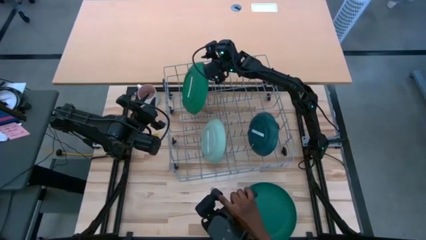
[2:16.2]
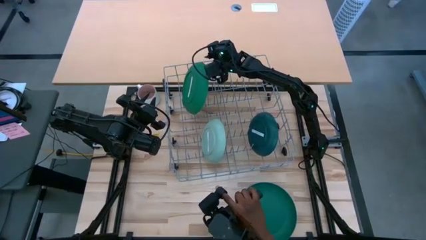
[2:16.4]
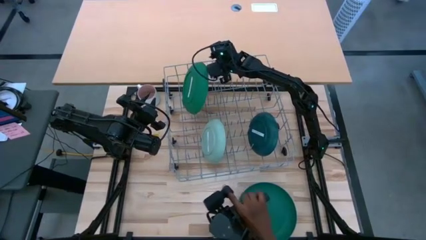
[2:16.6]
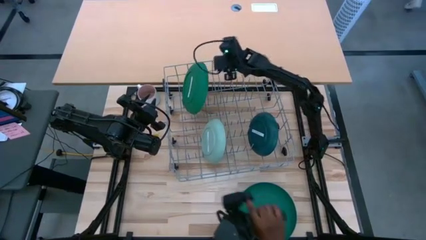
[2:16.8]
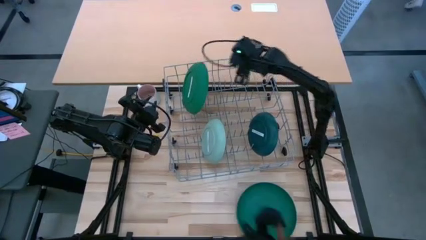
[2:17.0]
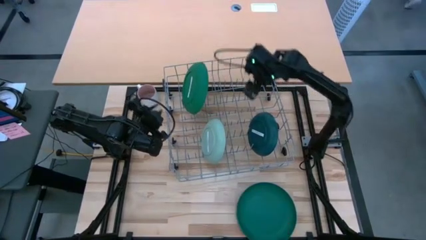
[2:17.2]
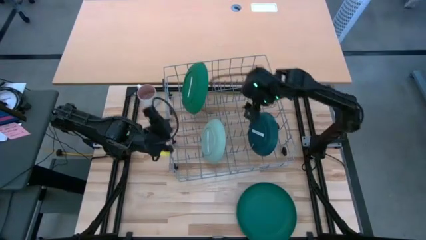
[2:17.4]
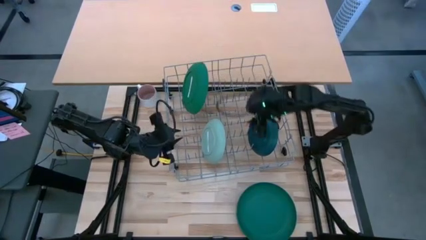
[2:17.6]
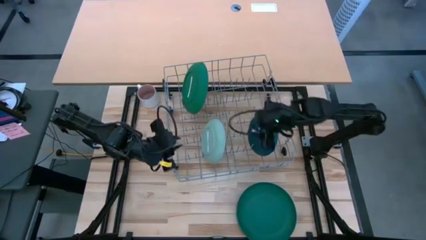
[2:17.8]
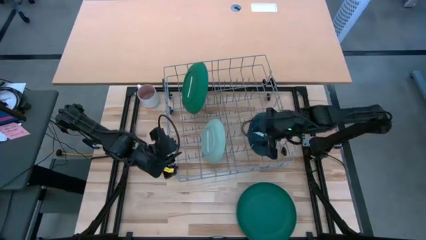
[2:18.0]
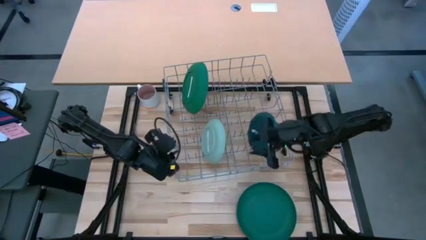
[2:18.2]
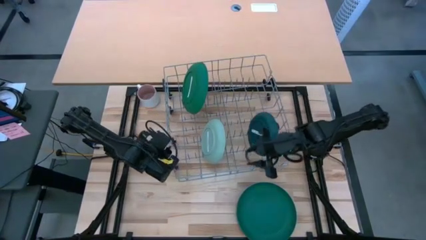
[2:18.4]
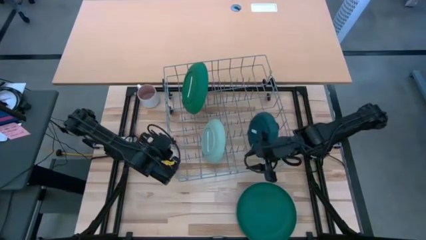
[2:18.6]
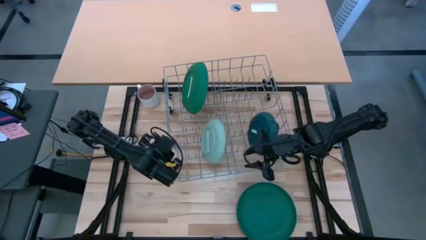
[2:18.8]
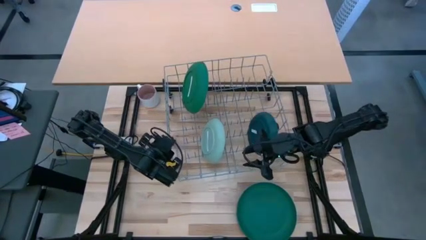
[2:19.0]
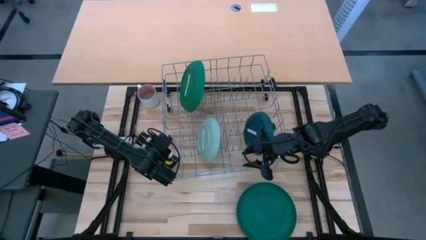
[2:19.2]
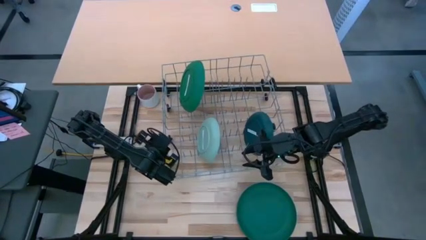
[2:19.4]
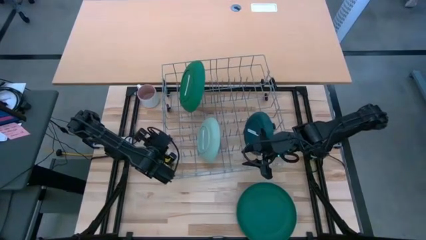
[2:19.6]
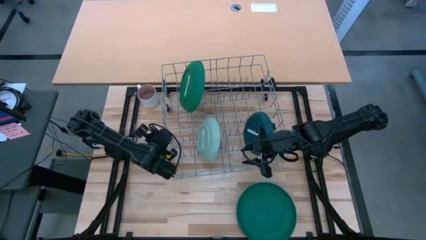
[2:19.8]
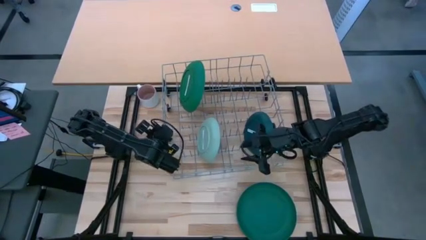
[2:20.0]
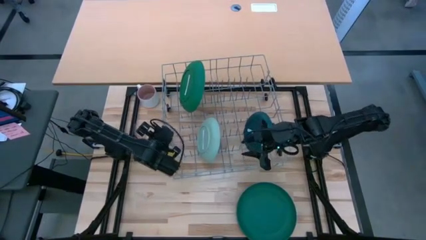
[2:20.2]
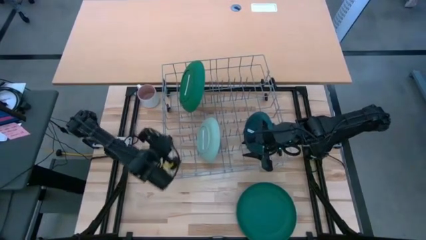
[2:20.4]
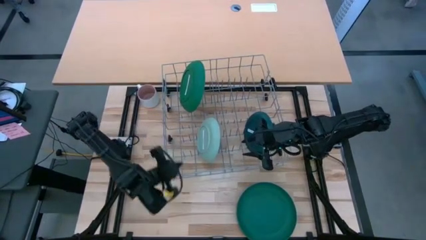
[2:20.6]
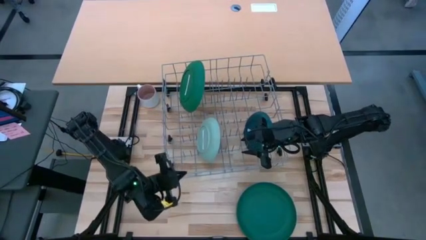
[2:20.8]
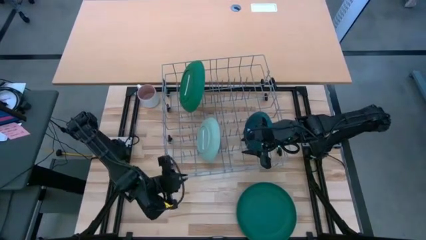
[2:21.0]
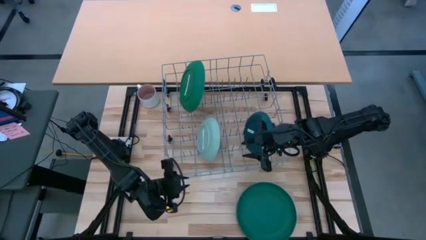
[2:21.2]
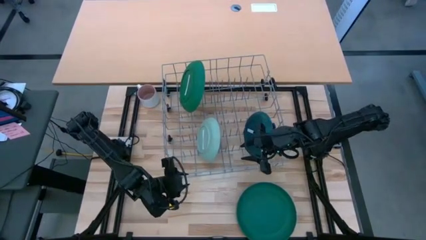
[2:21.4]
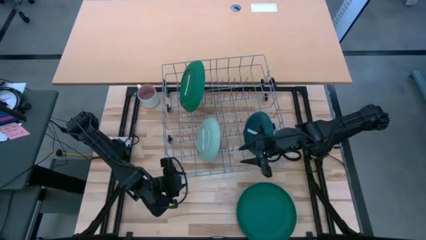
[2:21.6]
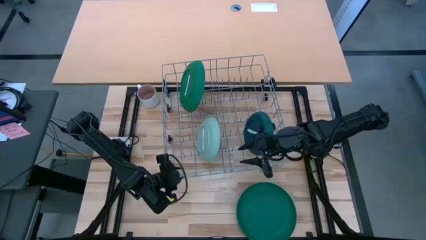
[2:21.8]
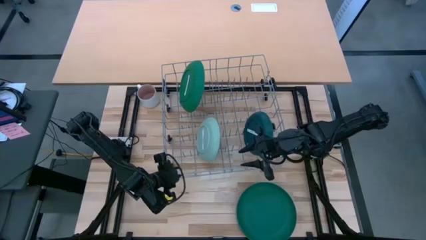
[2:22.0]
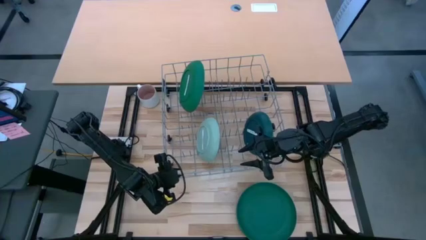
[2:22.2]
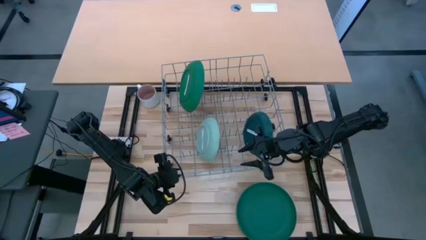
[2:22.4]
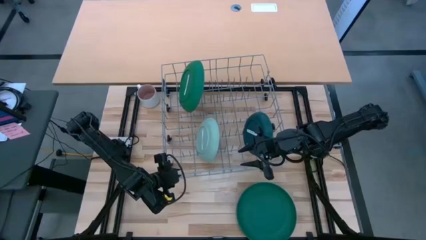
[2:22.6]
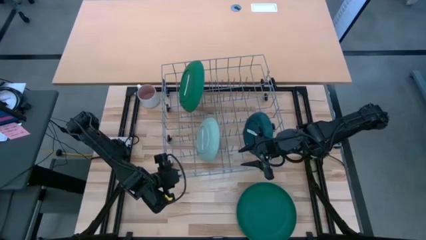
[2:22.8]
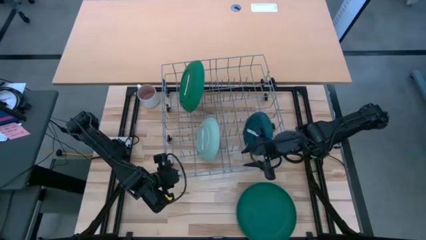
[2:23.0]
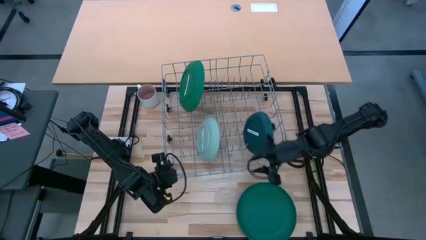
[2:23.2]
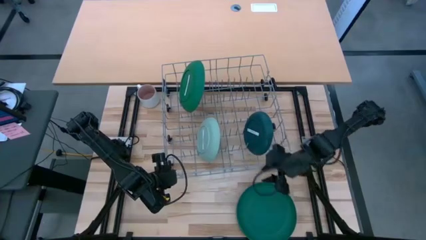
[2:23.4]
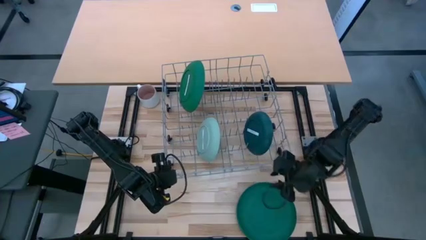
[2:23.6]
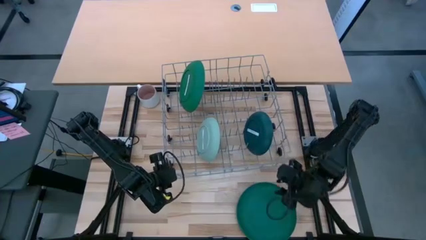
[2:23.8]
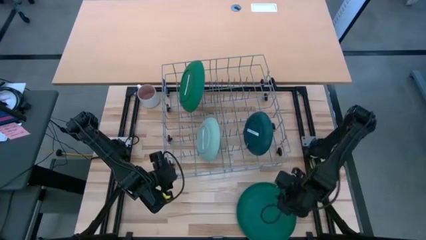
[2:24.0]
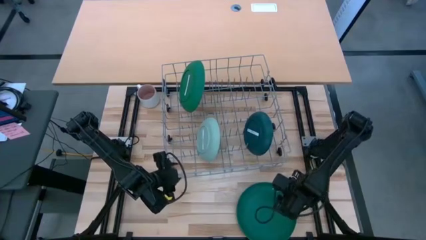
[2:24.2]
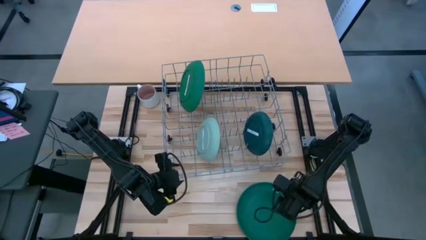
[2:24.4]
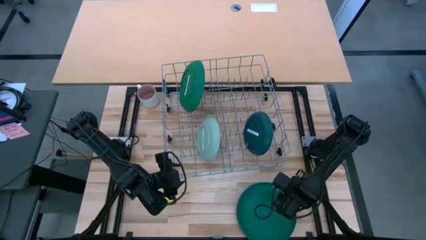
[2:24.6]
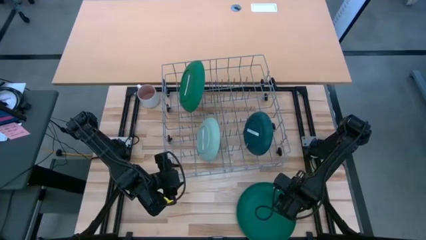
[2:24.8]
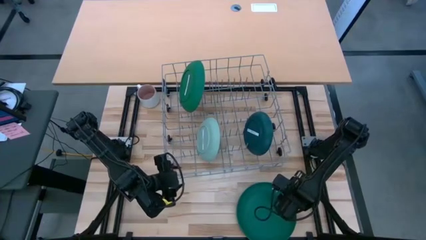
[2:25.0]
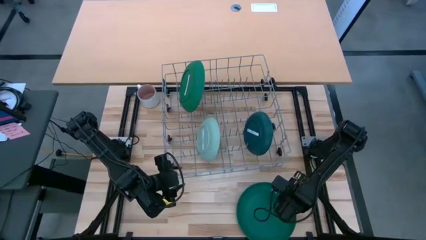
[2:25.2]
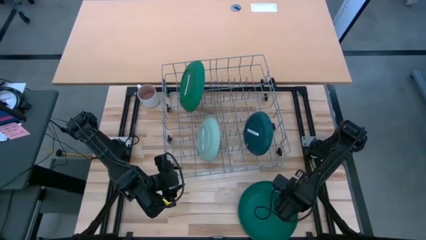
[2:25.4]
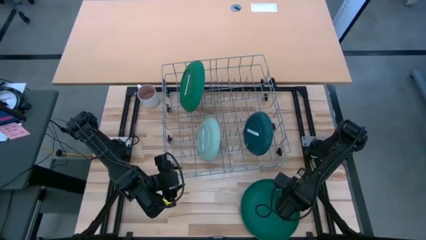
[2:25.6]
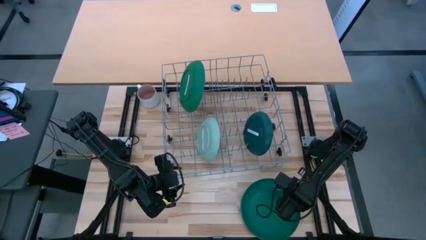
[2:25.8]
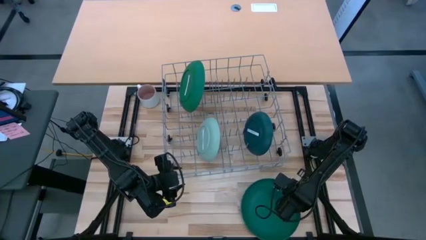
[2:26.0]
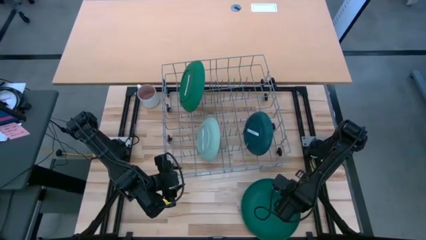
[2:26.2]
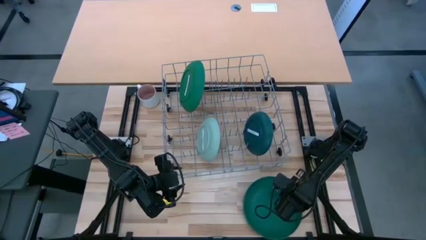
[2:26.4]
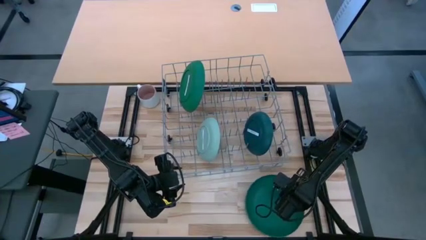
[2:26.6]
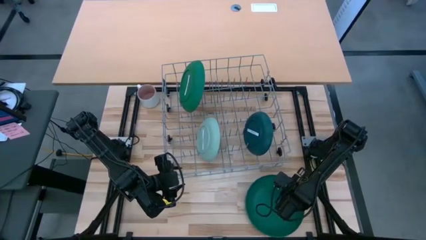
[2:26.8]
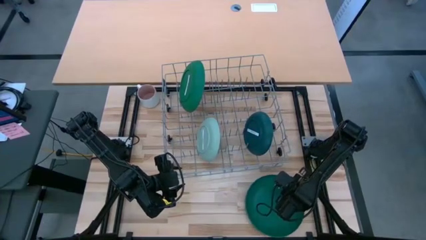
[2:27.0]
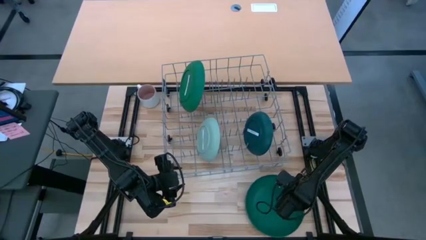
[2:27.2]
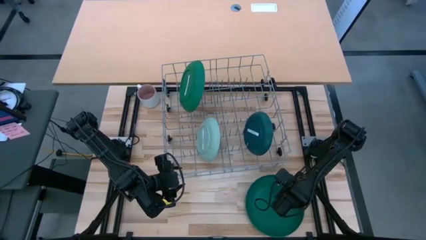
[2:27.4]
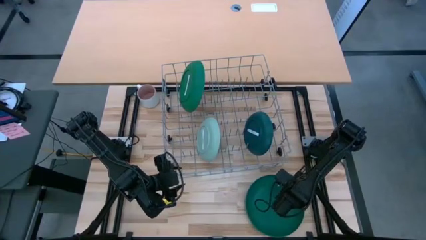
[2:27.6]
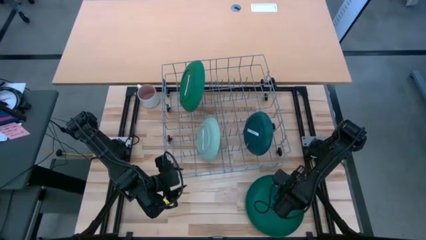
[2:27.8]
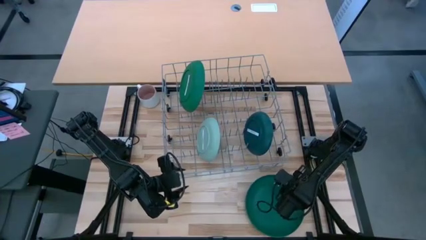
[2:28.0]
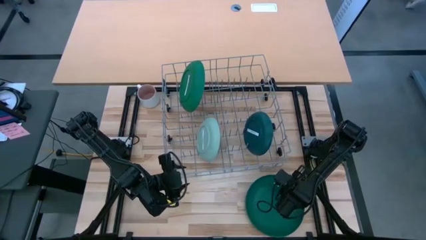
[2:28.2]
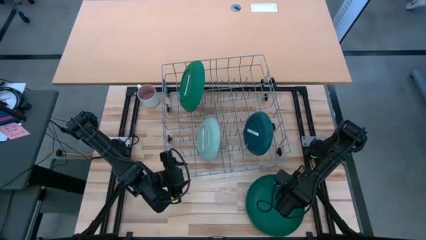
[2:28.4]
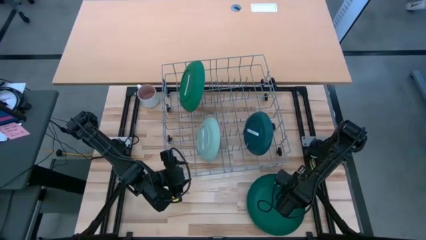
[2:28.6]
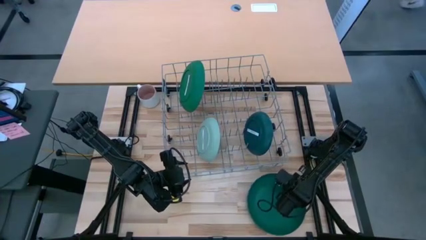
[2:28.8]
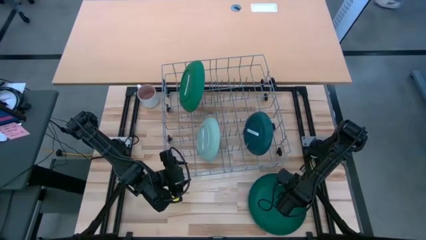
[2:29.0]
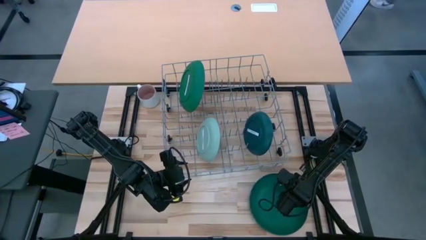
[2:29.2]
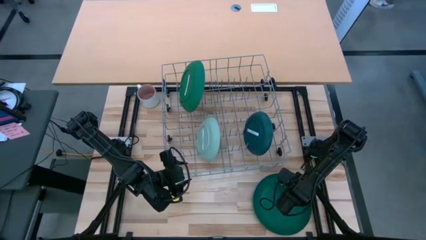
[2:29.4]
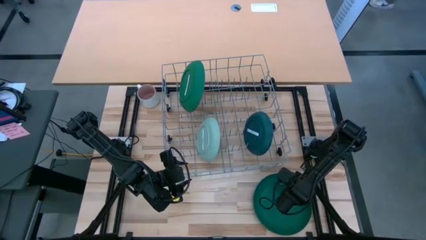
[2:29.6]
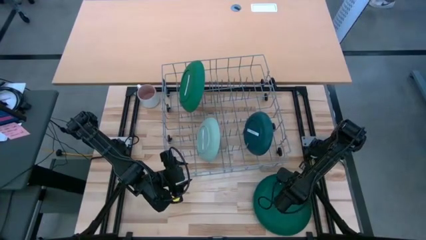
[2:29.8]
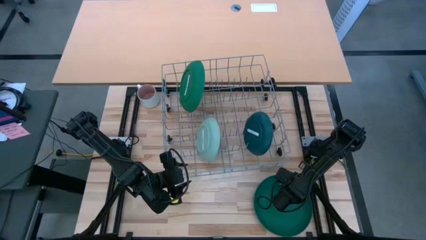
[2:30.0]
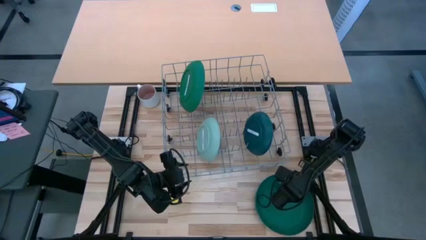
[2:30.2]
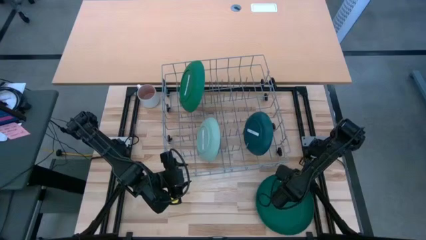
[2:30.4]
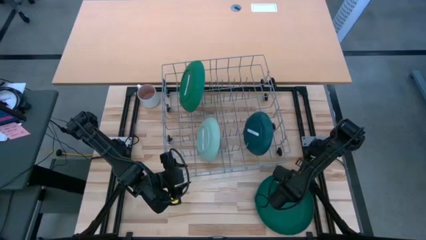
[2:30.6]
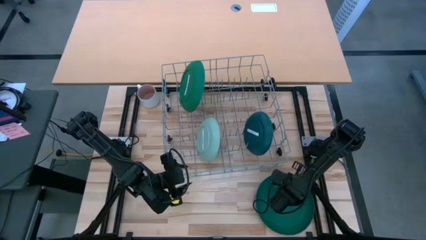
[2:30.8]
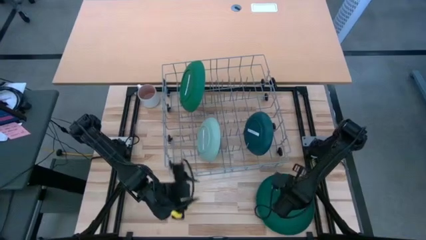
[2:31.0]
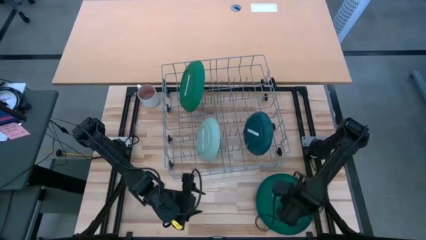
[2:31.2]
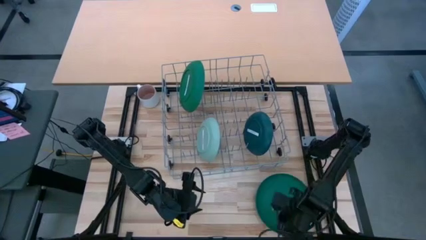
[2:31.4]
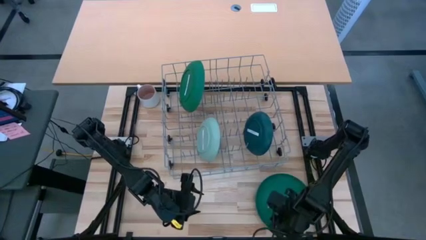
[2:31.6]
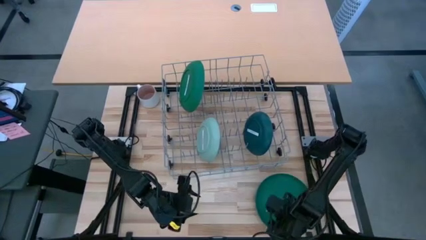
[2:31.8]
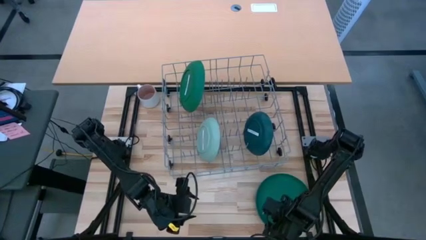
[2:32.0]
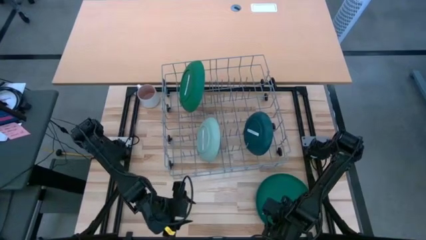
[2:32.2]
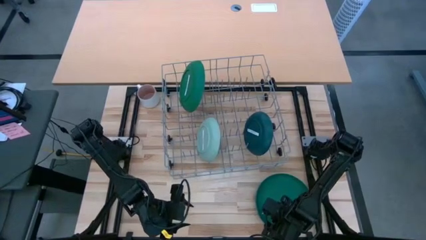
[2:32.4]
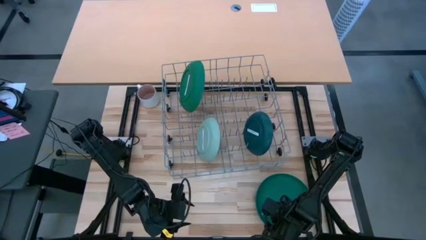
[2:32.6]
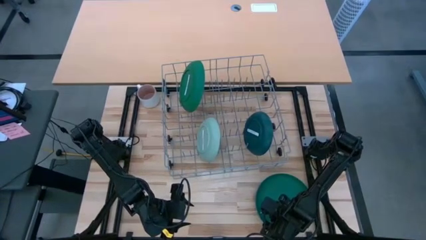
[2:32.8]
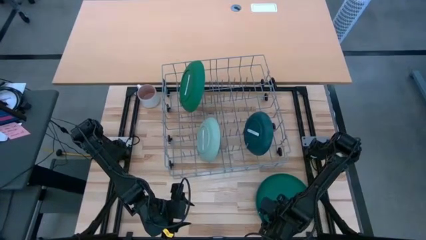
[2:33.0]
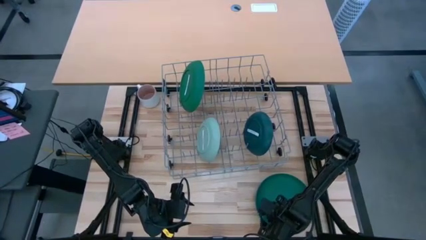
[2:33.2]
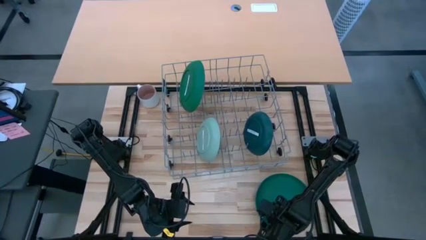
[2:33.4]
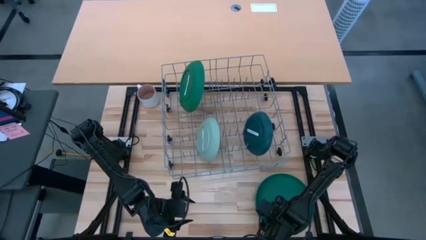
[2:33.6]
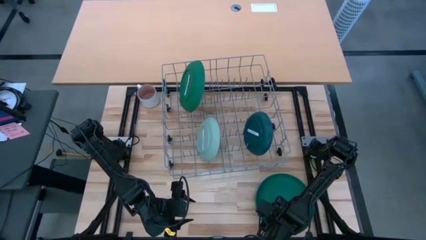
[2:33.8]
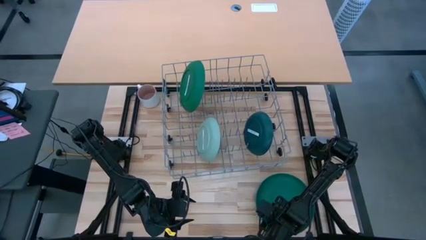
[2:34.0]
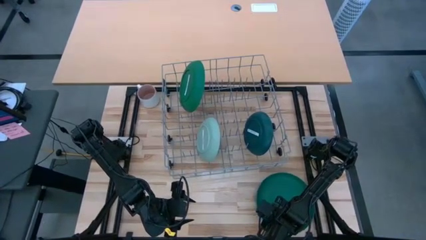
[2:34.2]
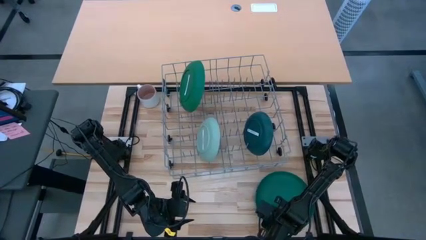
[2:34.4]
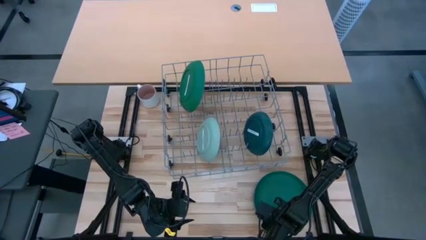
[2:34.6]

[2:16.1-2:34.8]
Task: Sort dishes
Put the stacked green plate in the dish rack
